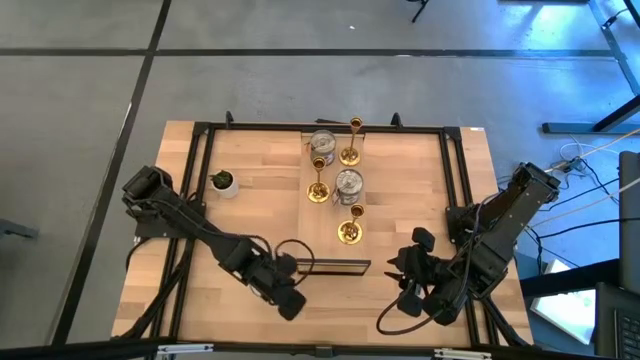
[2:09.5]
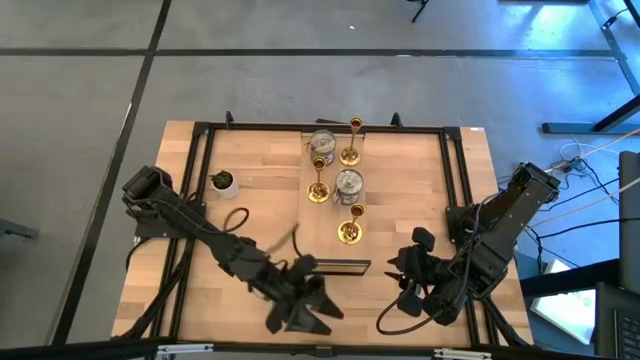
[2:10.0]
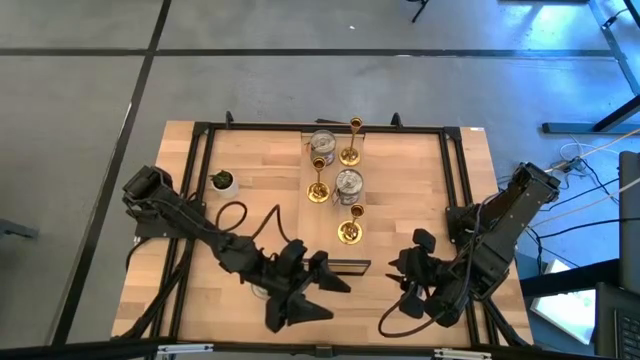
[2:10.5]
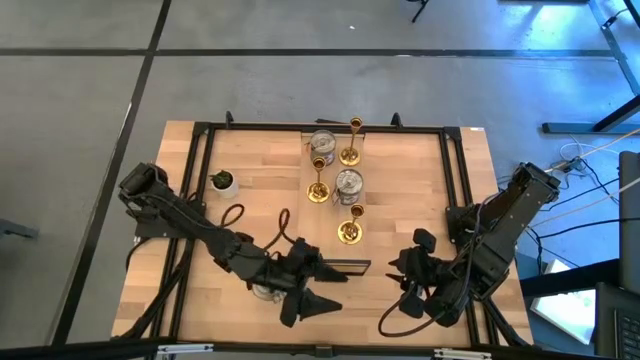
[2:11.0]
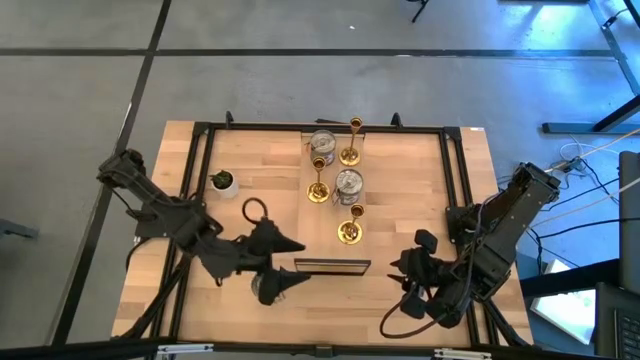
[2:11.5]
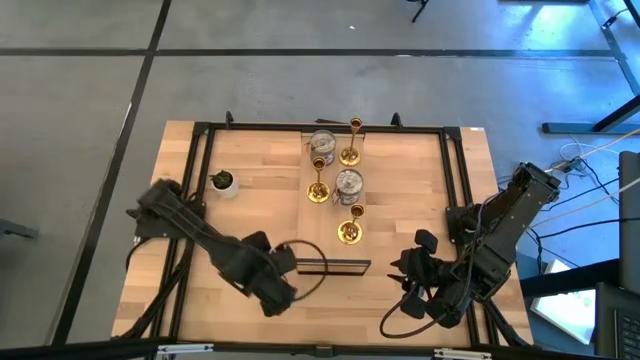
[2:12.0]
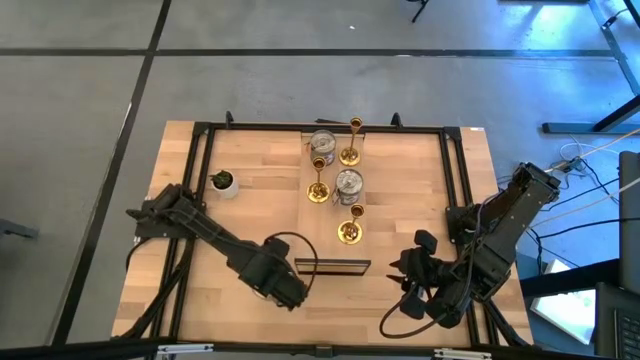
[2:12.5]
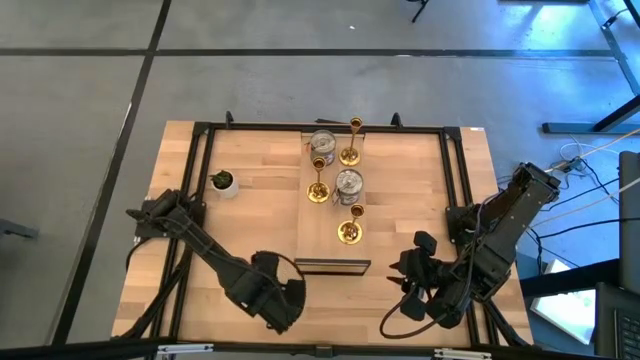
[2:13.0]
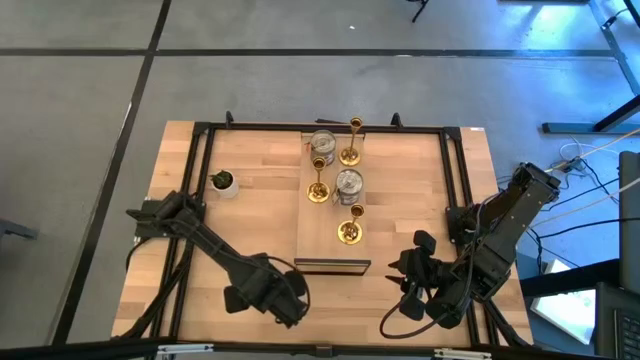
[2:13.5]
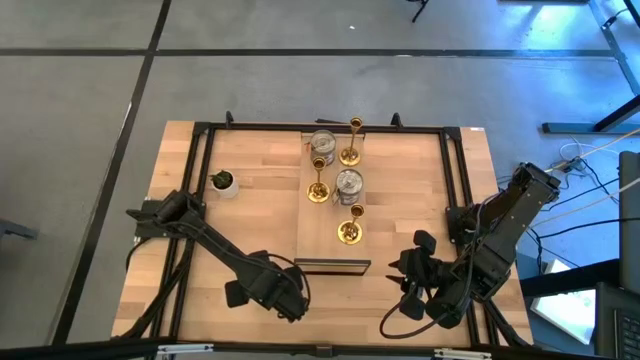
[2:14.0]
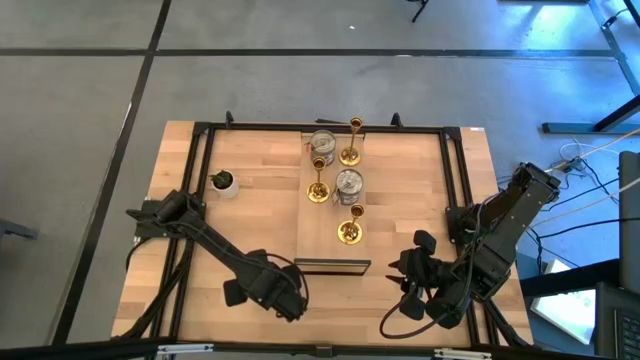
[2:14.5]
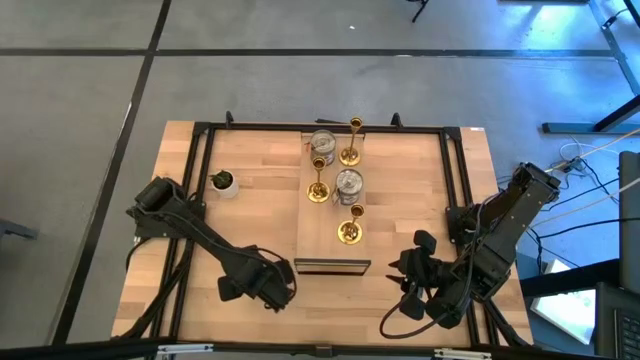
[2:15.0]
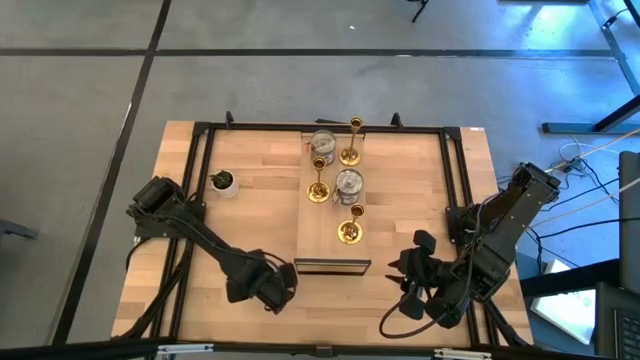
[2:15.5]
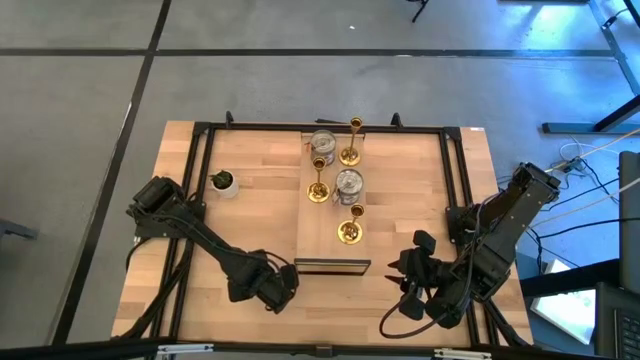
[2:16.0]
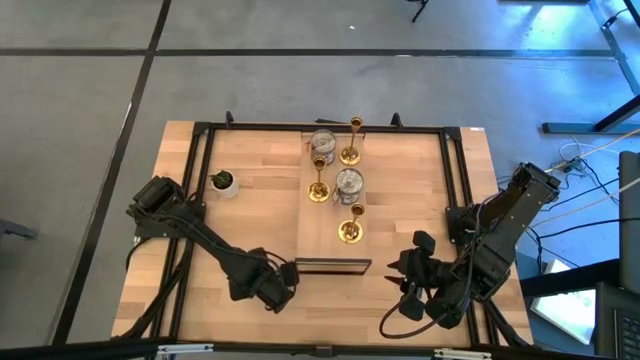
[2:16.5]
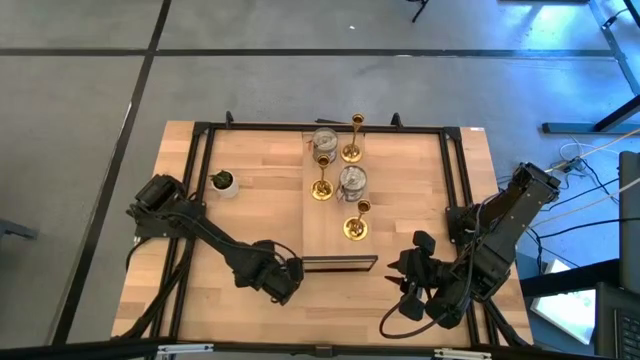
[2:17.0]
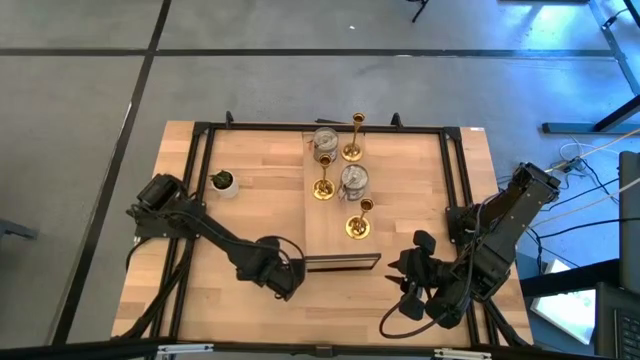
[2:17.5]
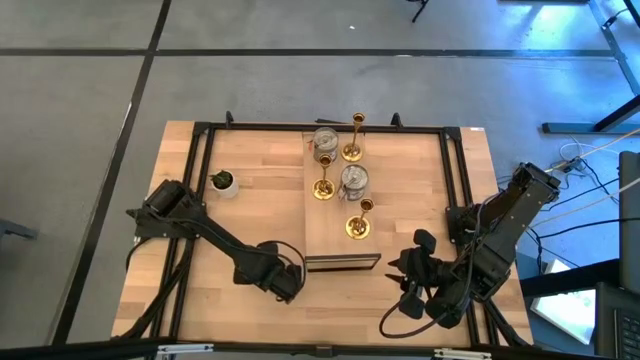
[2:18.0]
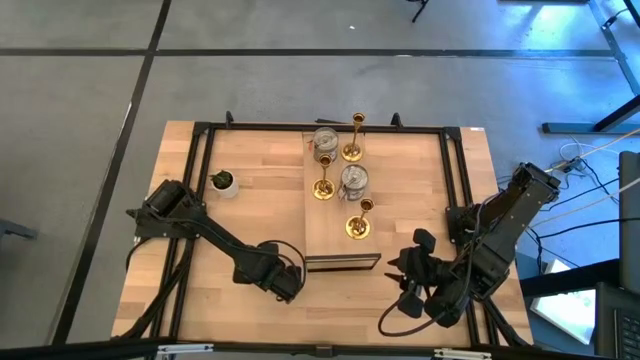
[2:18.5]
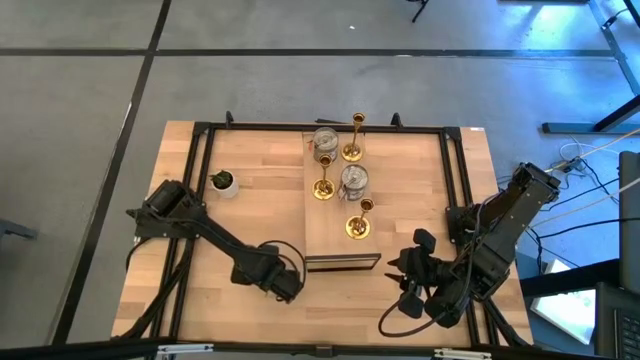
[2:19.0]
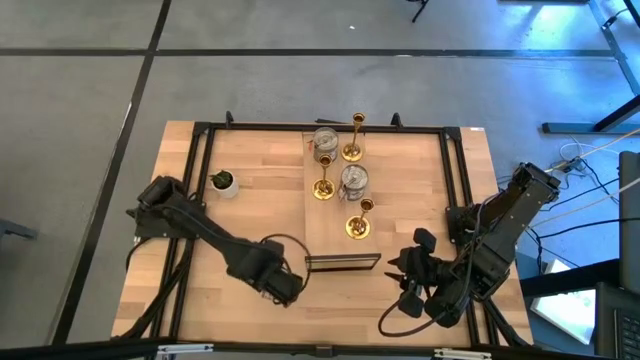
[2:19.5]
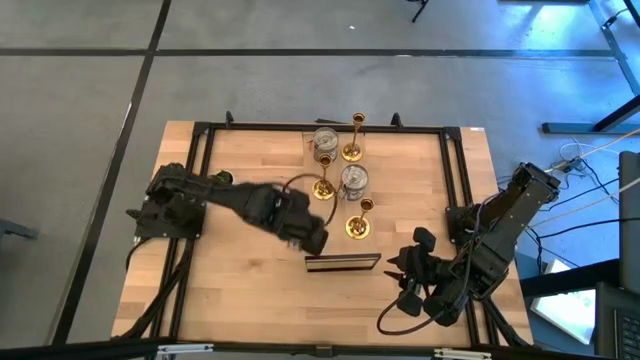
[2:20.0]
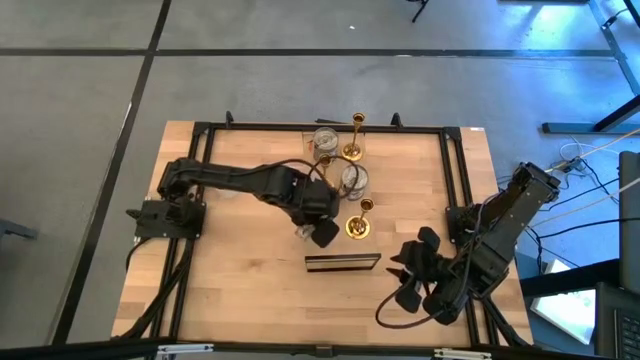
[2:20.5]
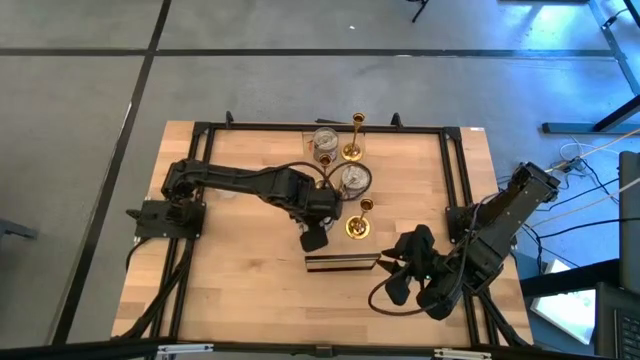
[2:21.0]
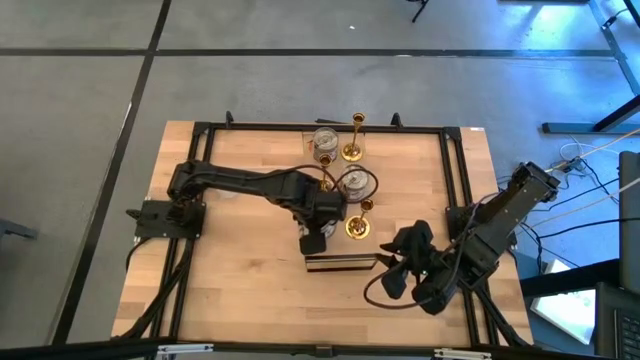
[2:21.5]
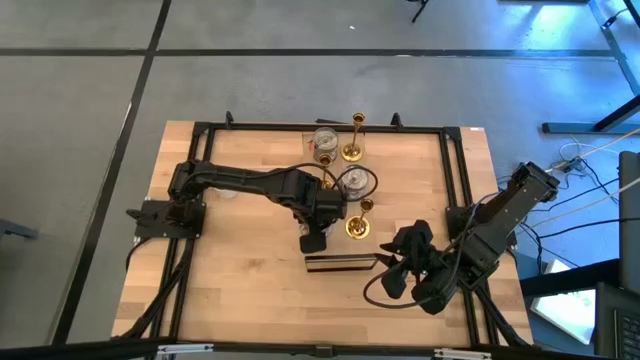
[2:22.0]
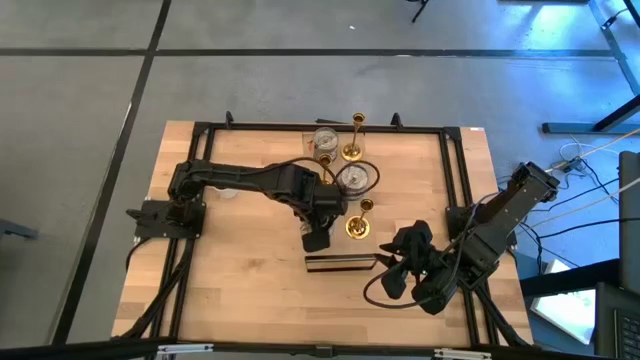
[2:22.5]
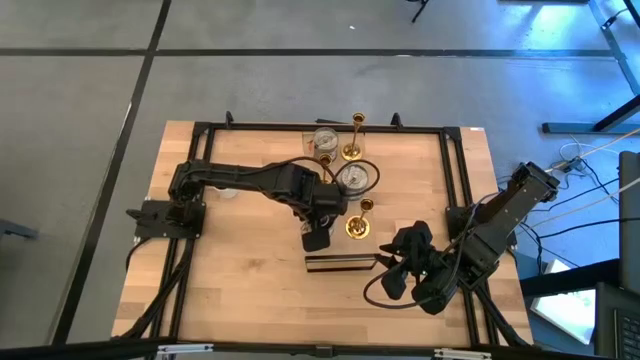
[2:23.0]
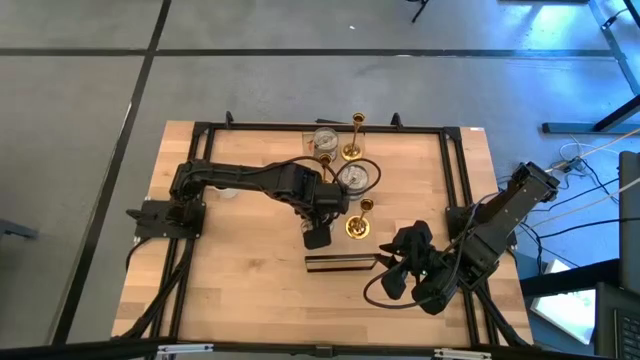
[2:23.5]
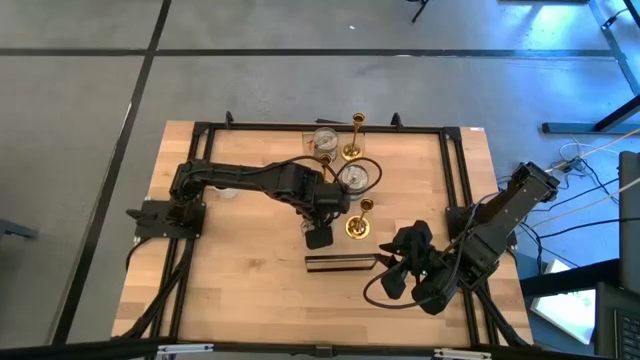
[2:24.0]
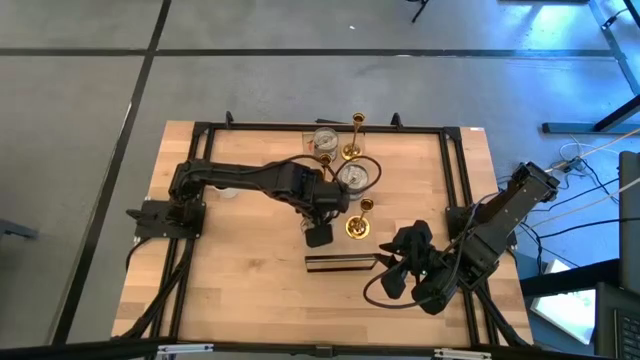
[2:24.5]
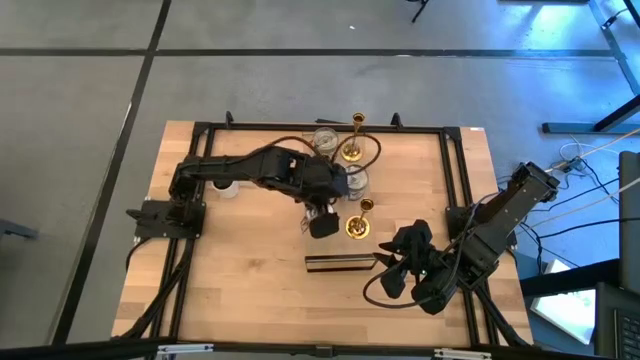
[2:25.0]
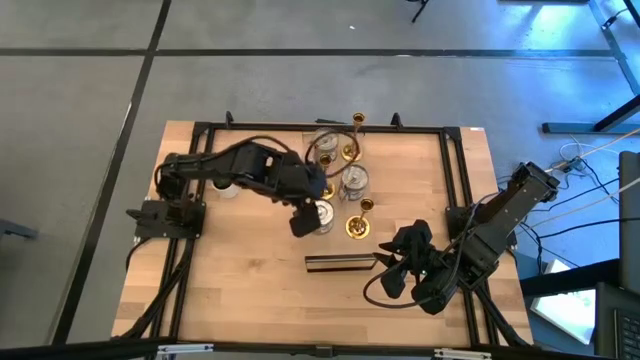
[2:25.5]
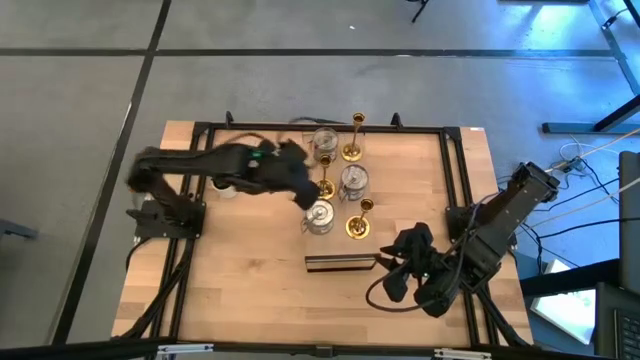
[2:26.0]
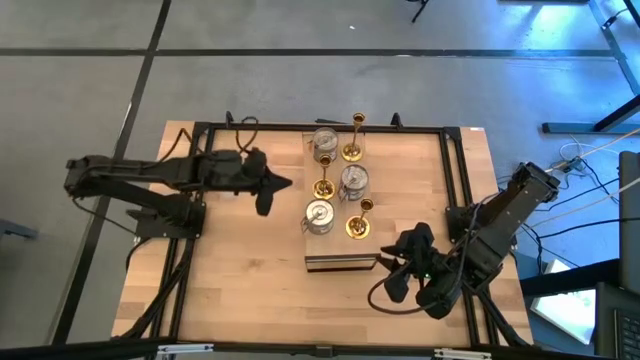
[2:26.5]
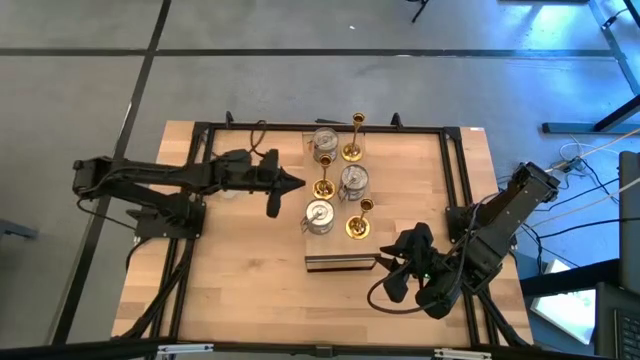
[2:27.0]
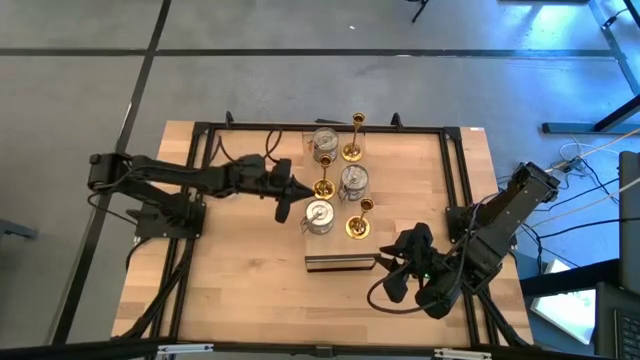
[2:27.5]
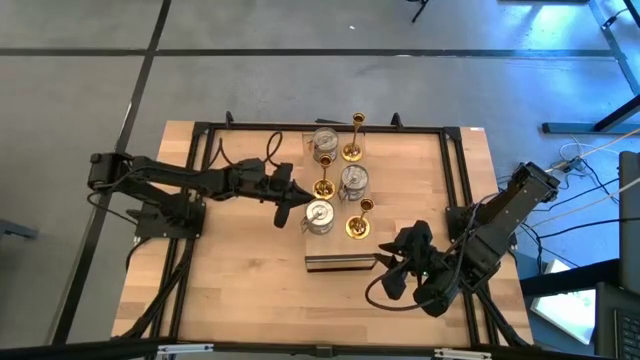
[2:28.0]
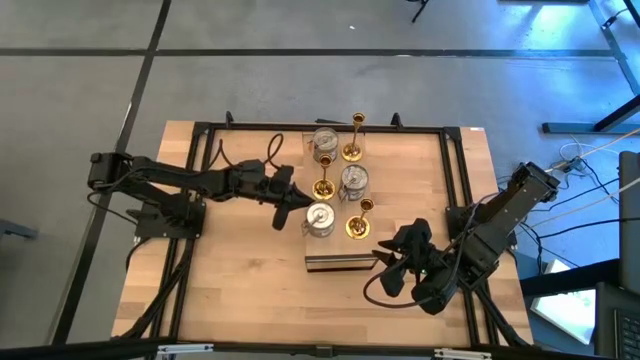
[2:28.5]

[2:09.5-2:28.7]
Task: Pick & Place candle stick holders
Put the brown scented candle on the shelf

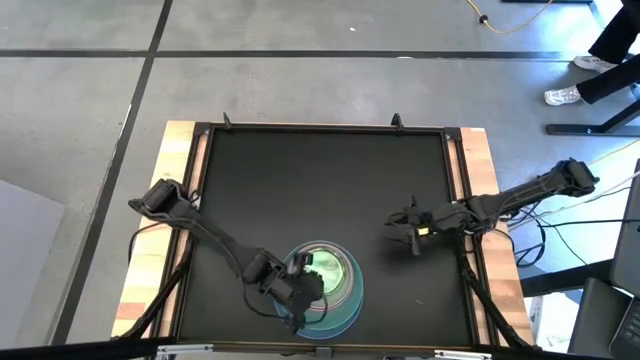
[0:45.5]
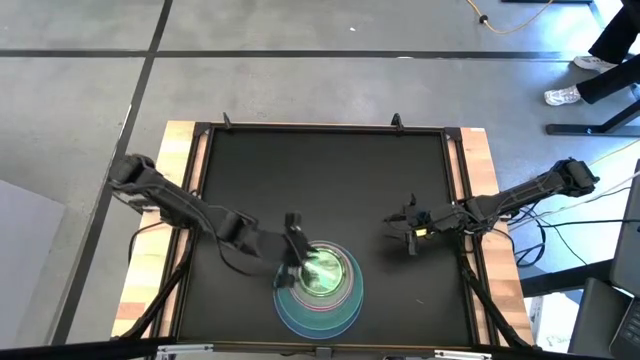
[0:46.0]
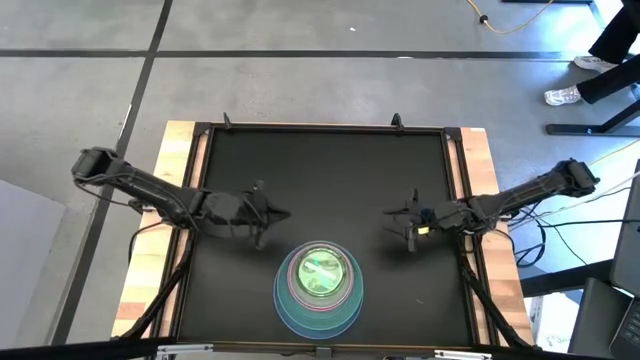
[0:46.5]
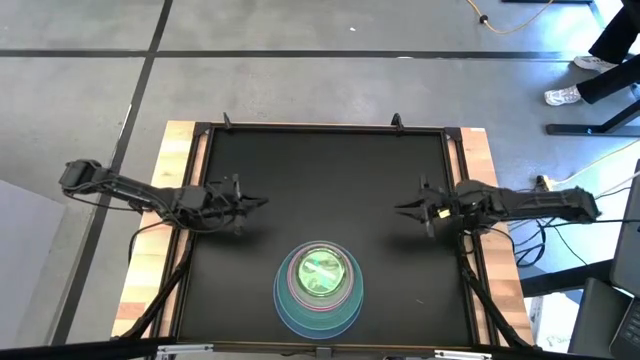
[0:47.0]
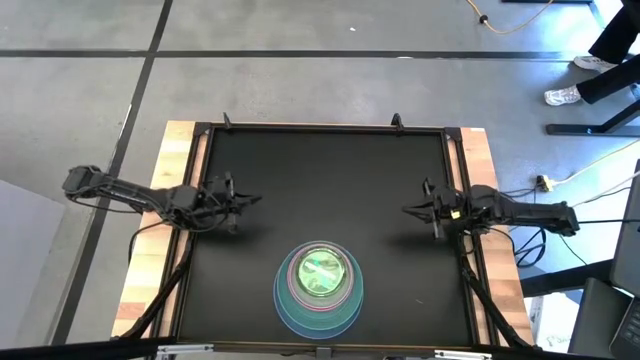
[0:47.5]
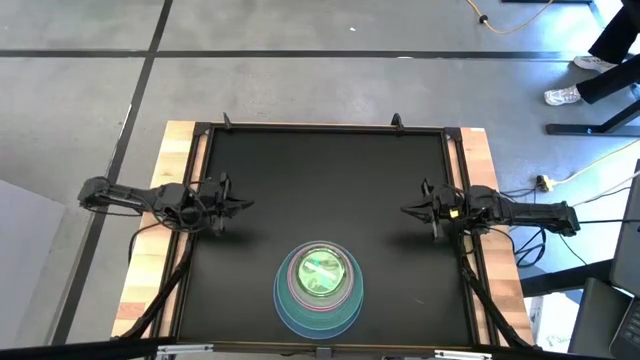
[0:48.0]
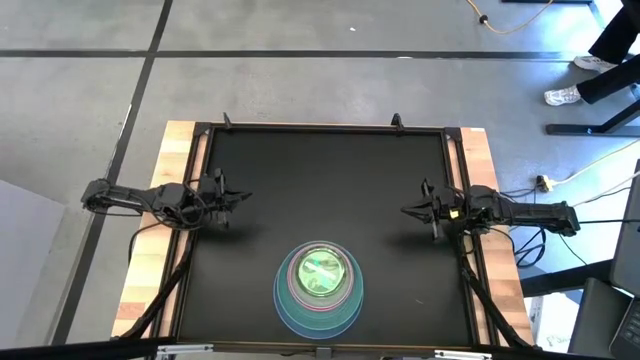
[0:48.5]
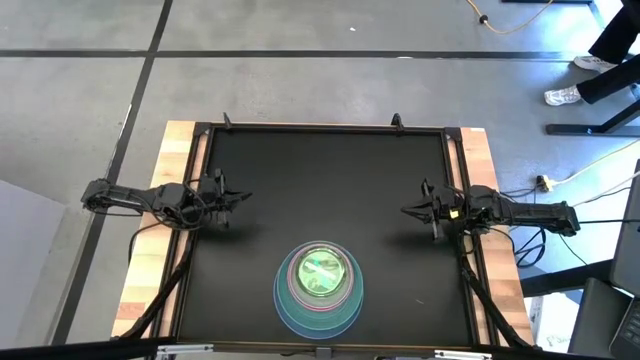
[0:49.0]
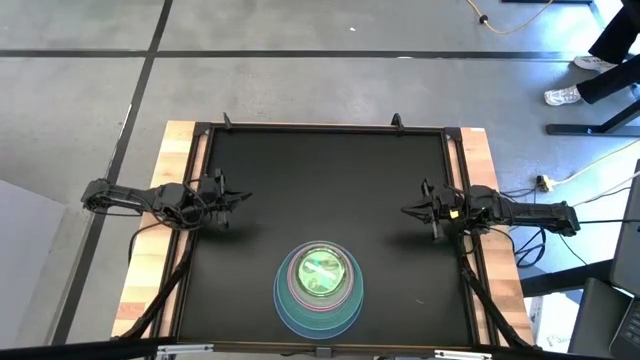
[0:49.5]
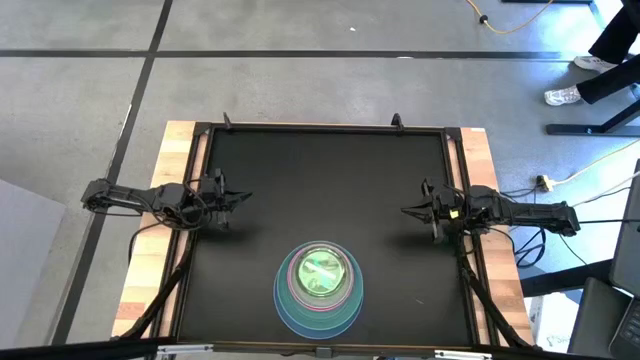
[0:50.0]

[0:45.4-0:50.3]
Task: Stack plastic plates
Return to Home Position
